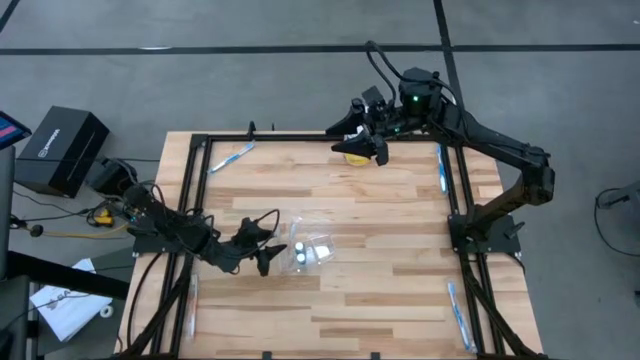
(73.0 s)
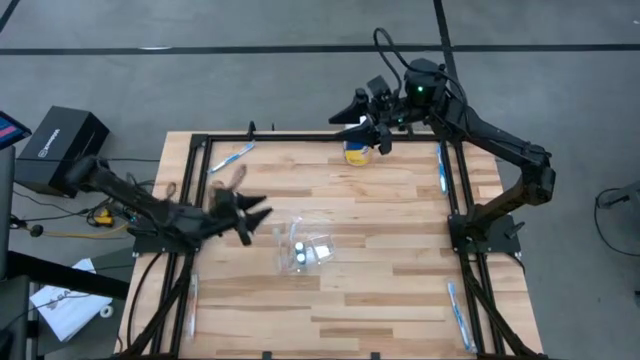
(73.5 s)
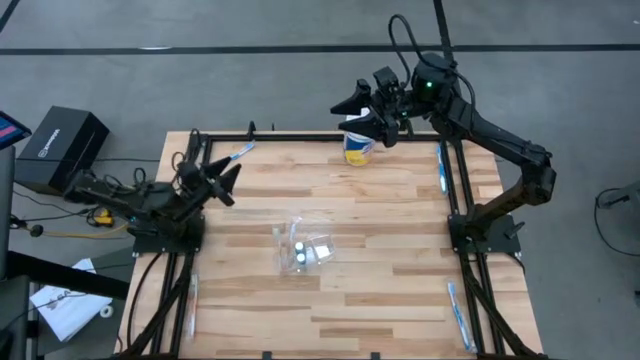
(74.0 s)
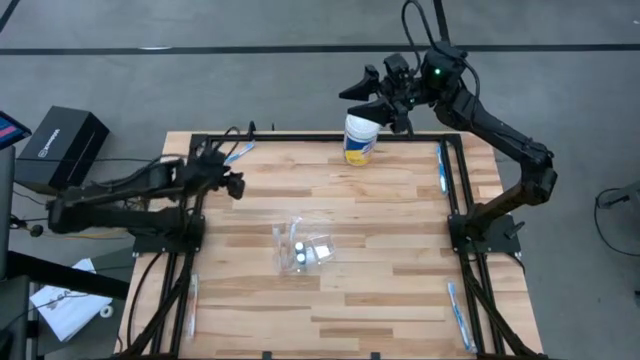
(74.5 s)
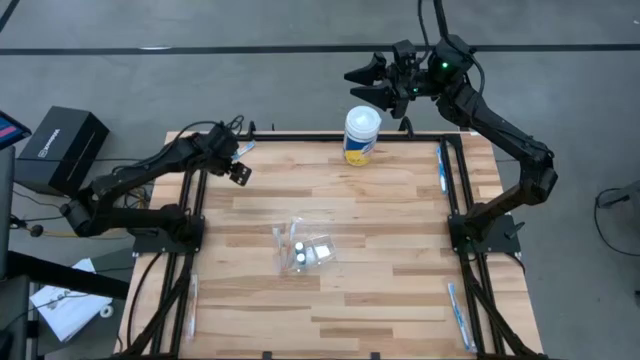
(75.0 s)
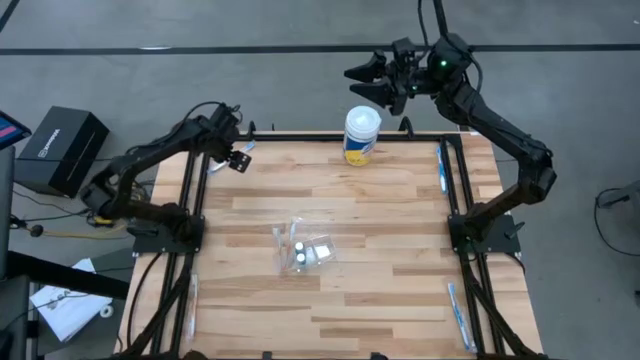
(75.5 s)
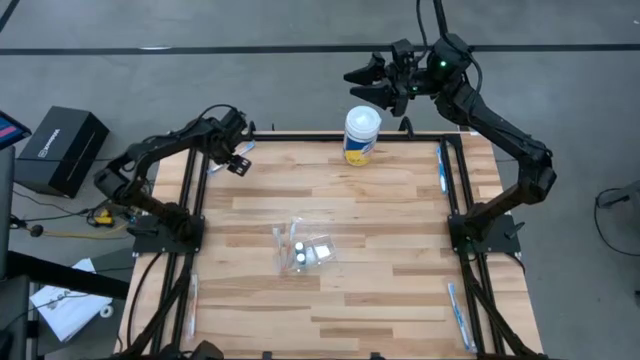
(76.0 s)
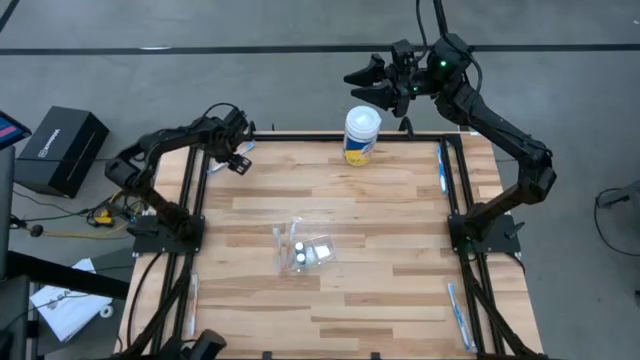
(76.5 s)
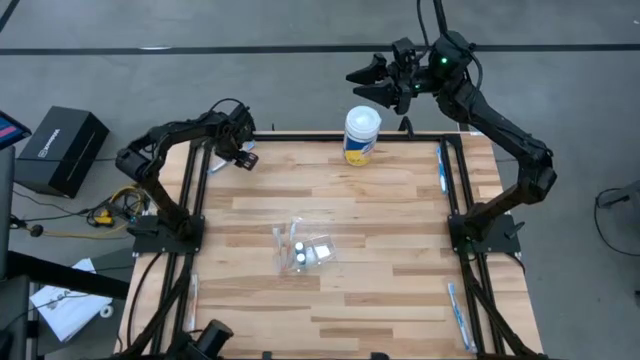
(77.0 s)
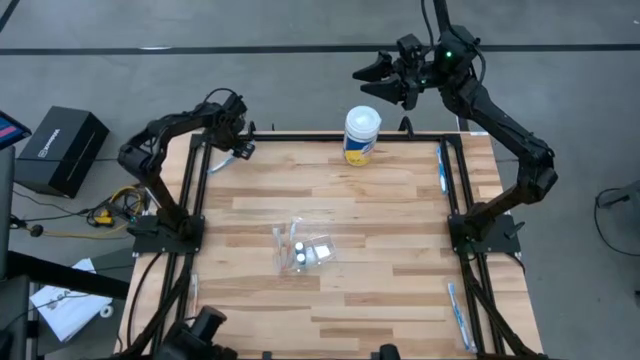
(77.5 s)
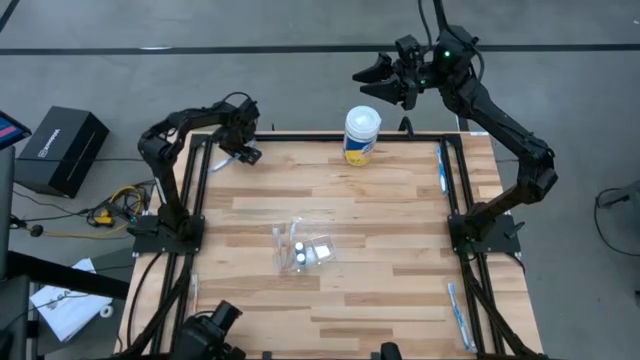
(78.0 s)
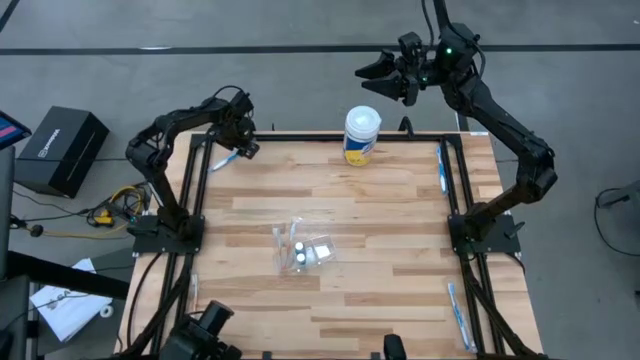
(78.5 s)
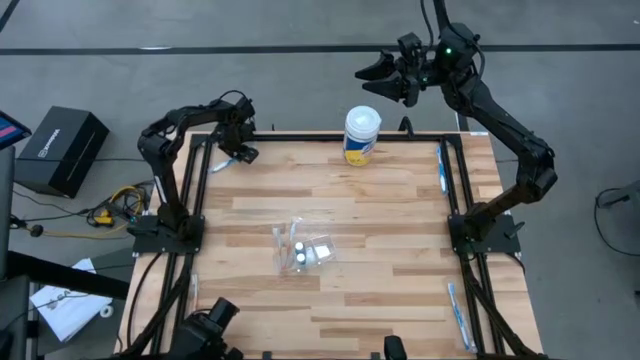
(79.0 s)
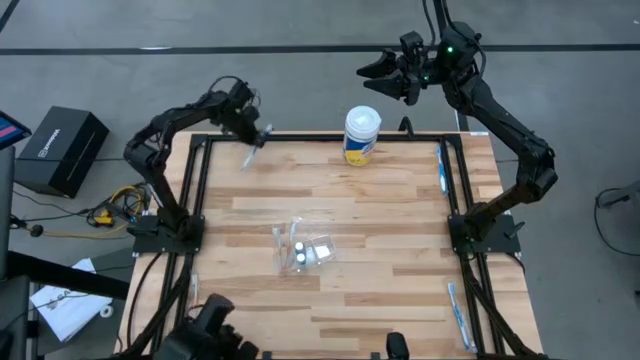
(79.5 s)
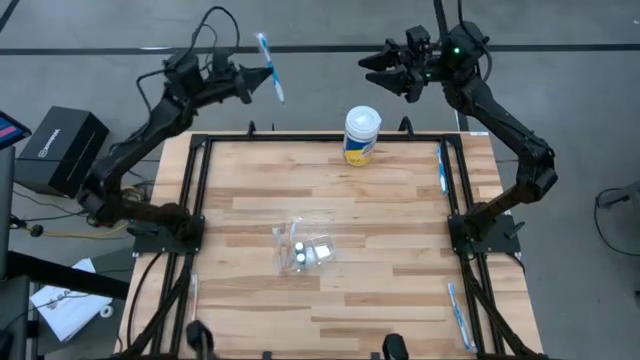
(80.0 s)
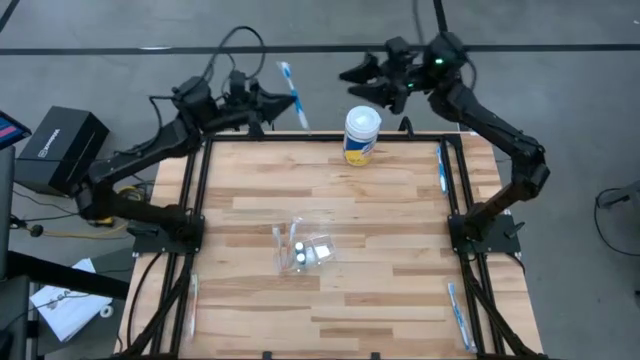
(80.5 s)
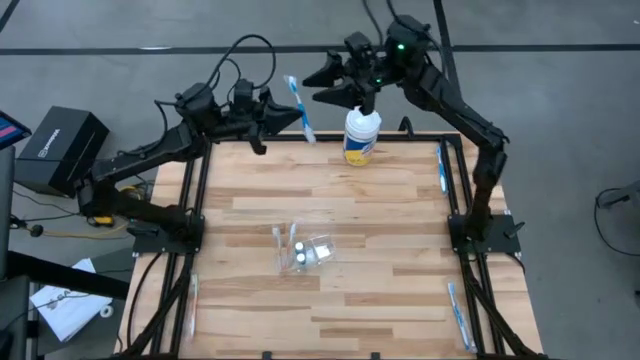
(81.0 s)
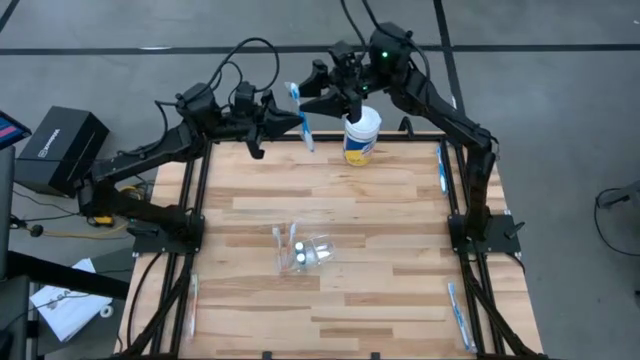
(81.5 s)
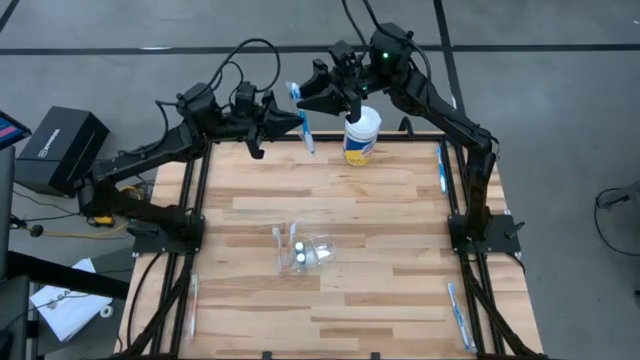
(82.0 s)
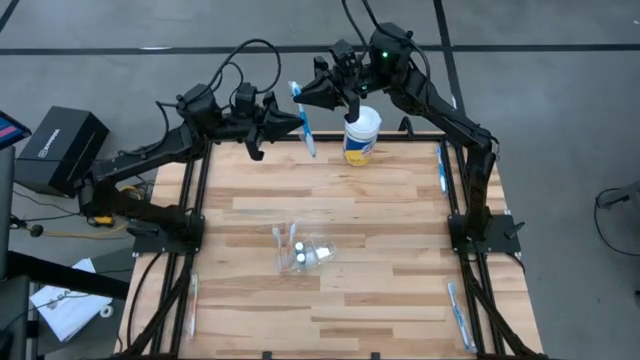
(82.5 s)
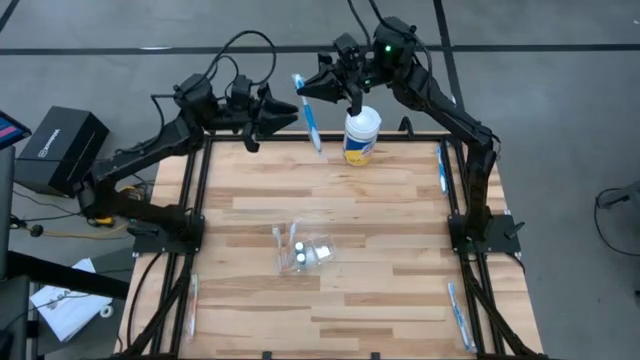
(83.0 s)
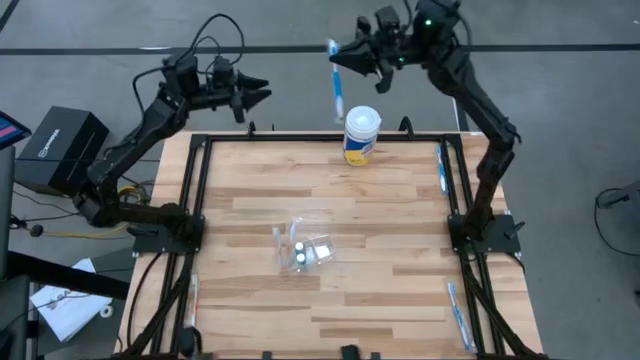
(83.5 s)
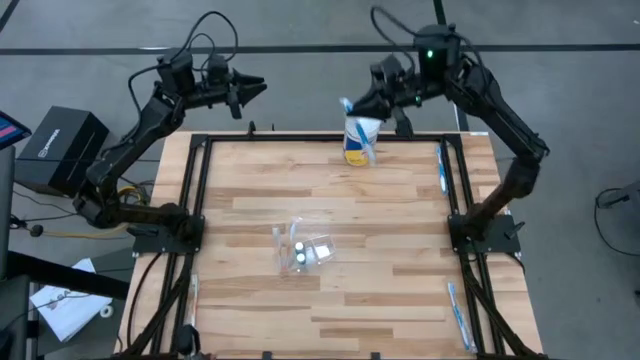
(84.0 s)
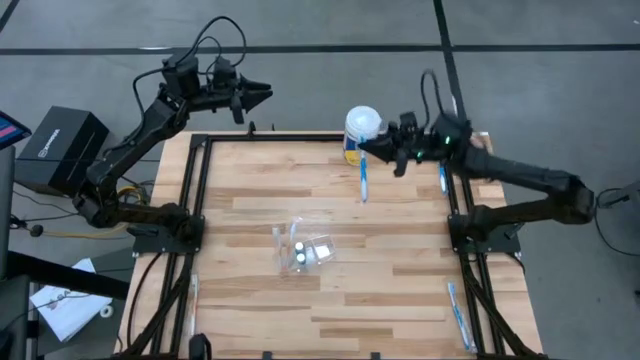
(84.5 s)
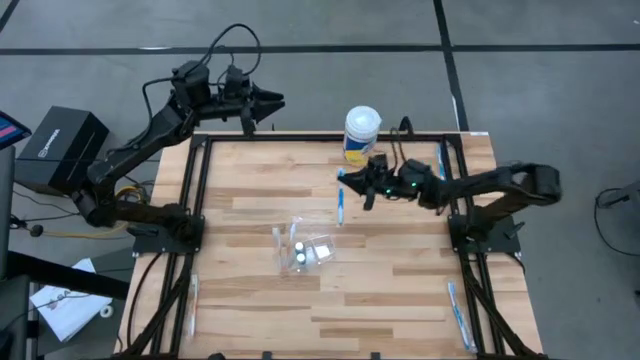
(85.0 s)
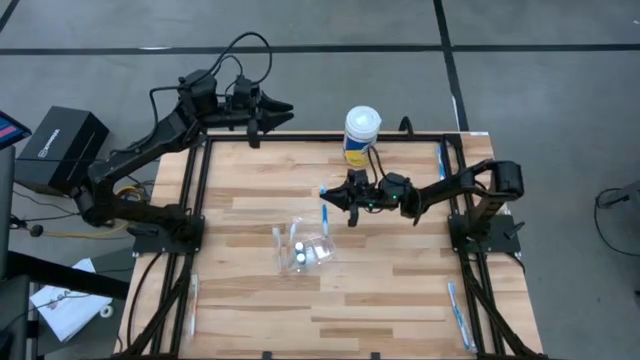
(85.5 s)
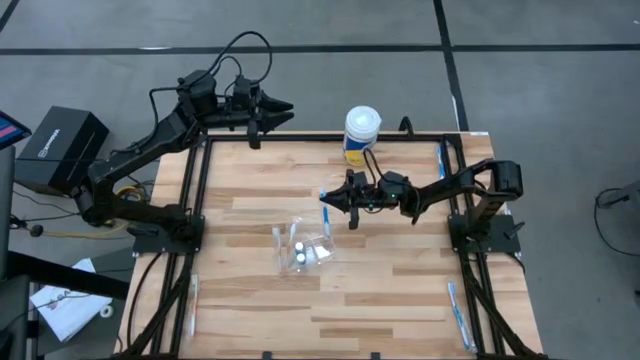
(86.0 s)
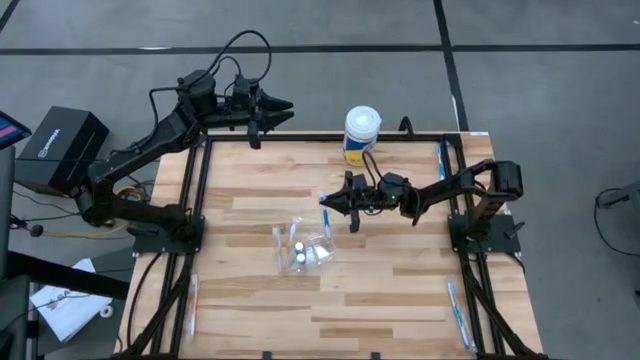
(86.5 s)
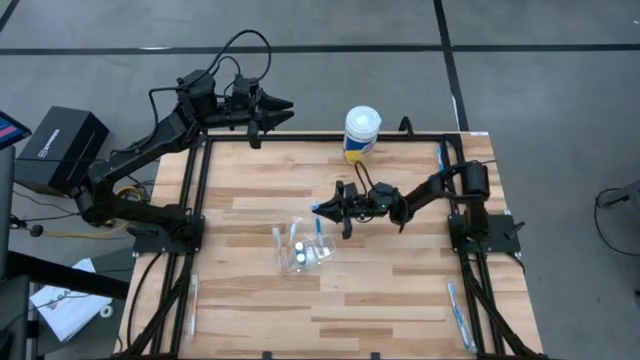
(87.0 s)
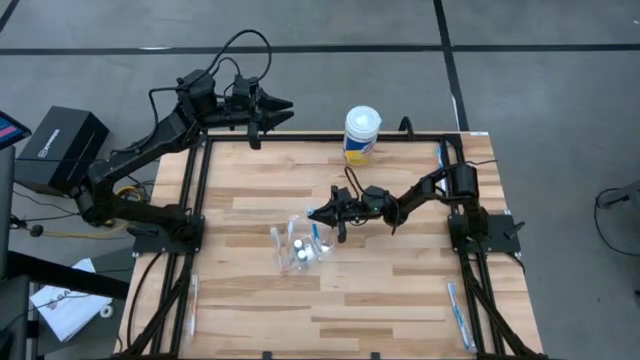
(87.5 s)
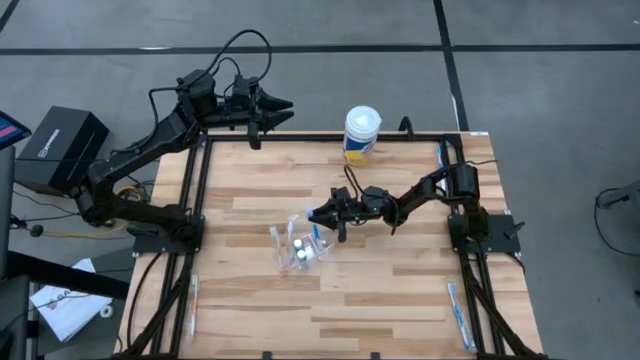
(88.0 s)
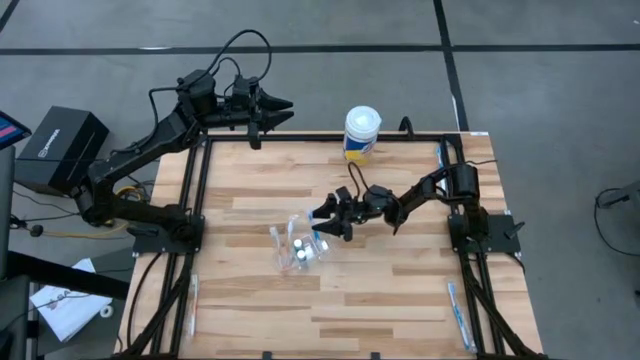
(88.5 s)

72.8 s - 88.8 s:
Task: Pick & Place toothbrushing station
Put the left blue toothbrush into the transparent organizer

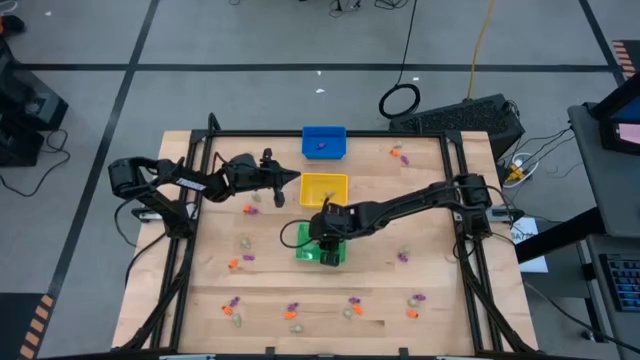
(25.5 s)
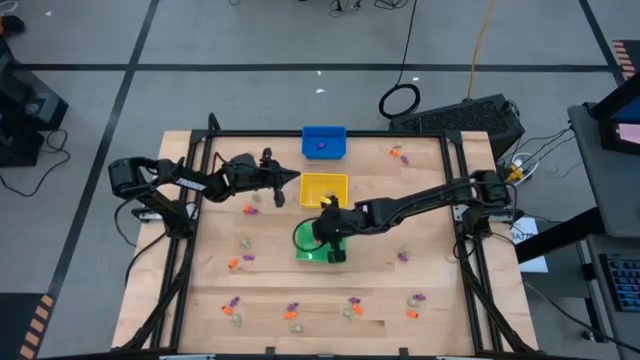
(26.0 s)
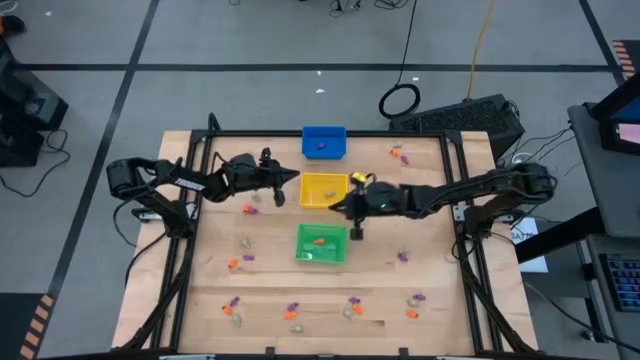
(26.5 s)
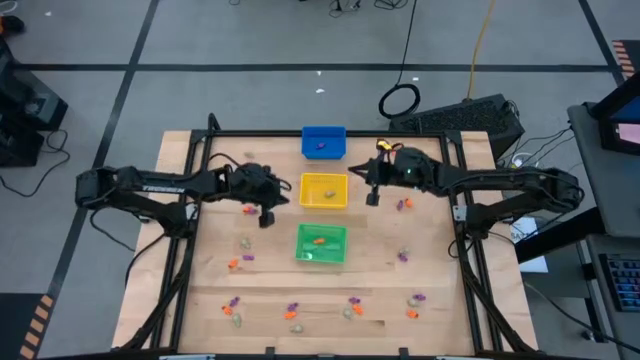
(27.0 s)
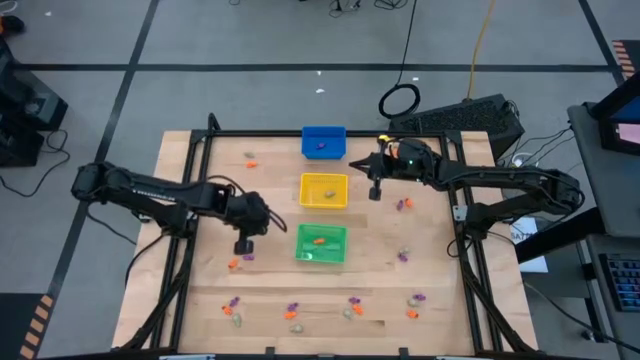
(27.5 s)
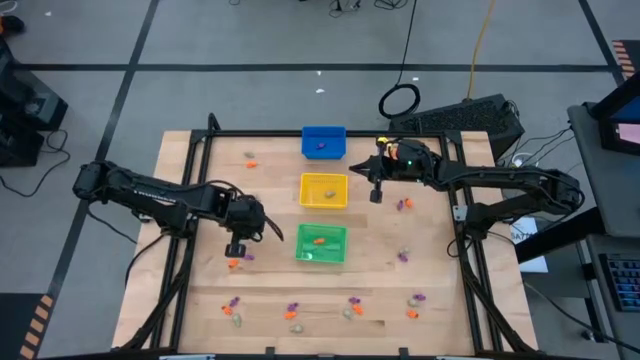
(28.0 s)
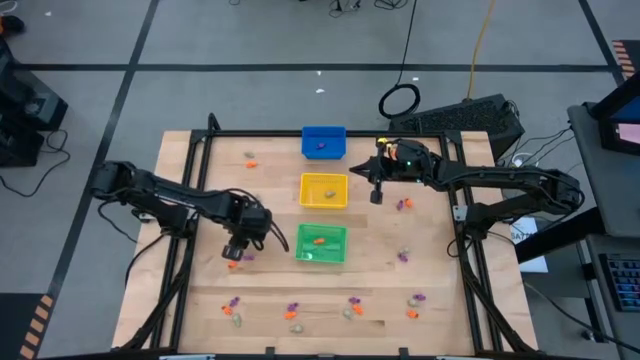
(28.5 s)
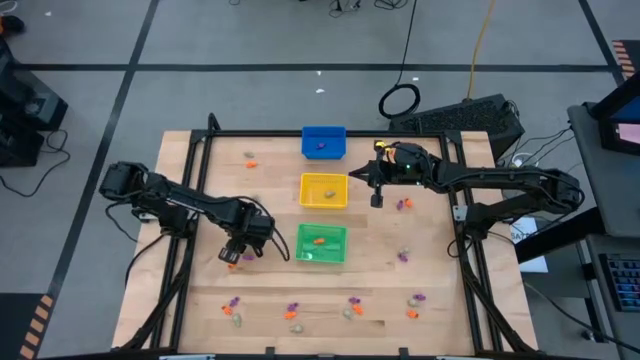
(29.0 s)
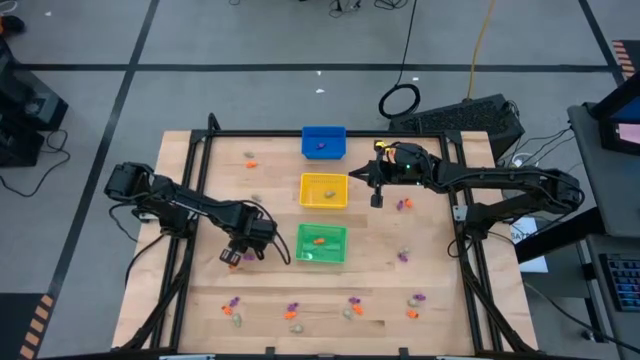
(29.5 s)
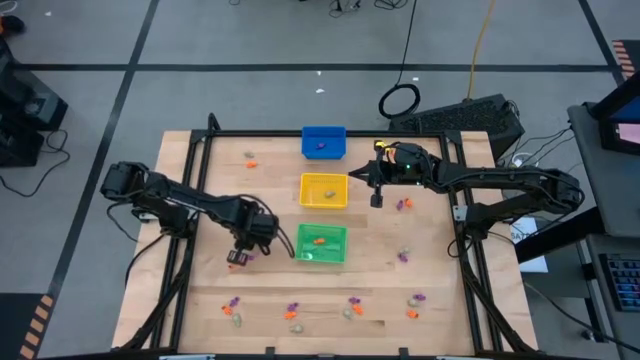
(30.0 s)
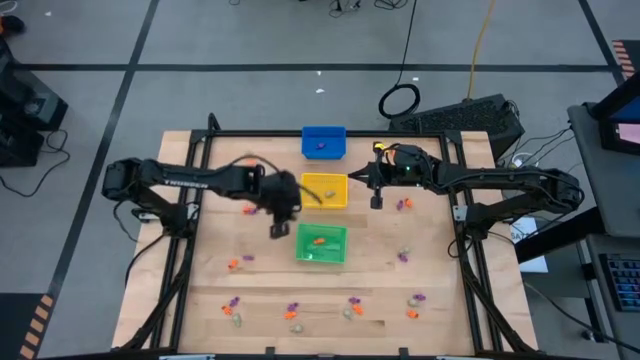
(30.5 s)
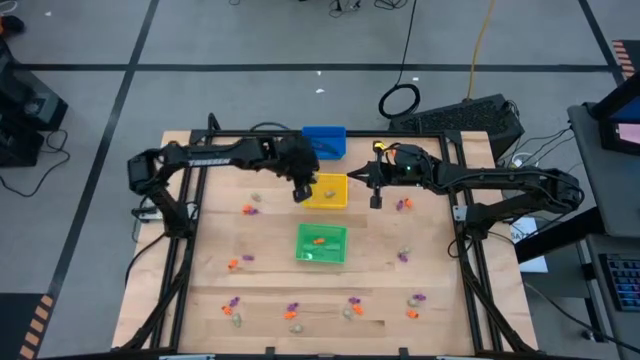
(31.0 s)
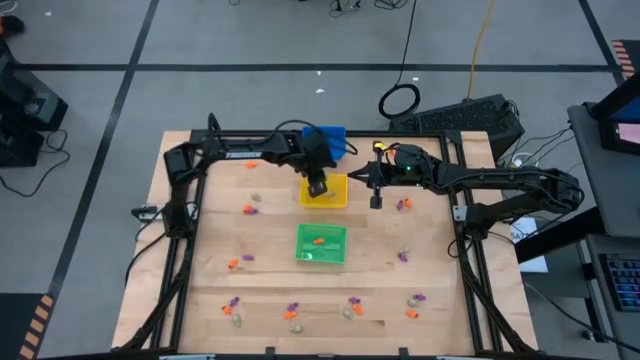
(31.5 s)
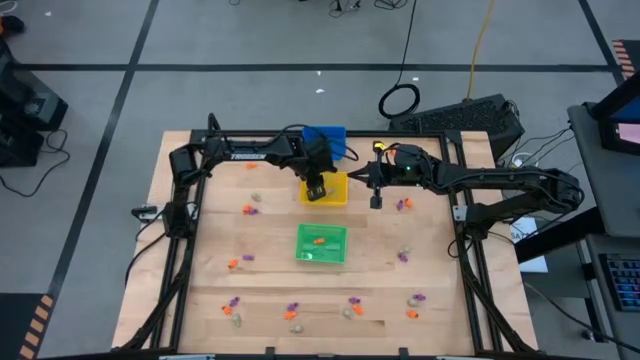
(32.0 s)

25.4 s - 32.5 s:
Task: Sort Halloween decoration
Put the skull toy into the yellow bin
